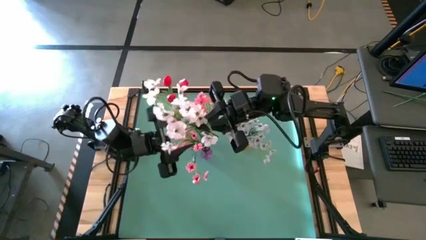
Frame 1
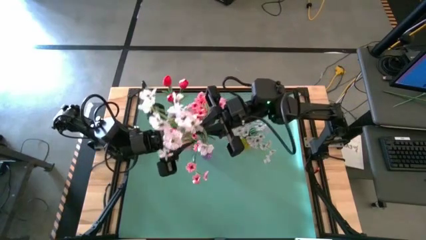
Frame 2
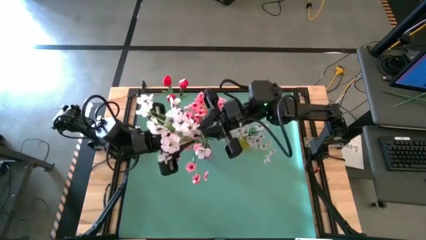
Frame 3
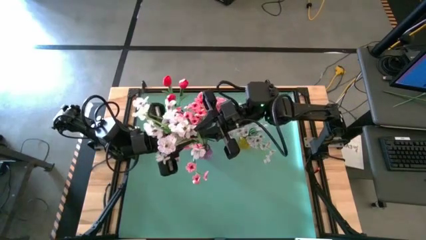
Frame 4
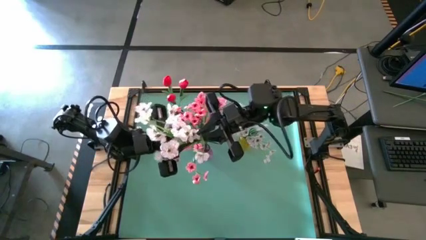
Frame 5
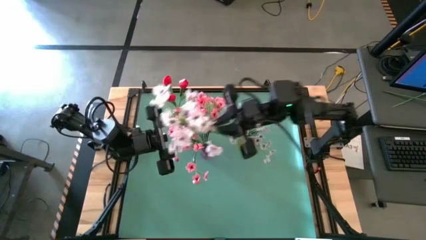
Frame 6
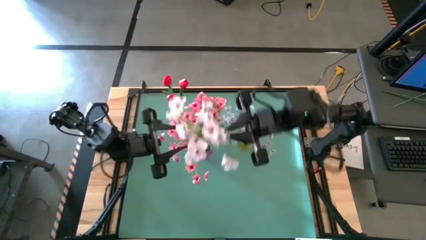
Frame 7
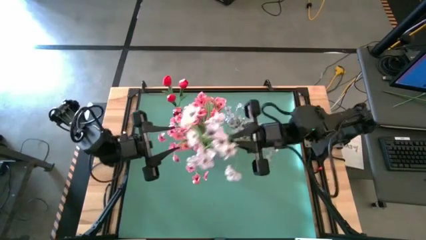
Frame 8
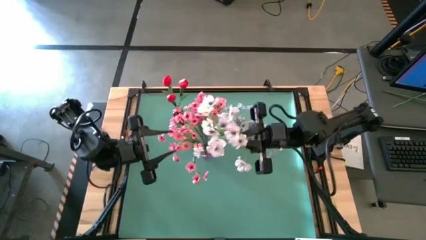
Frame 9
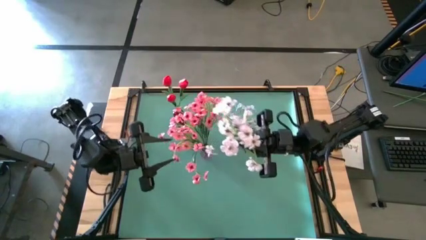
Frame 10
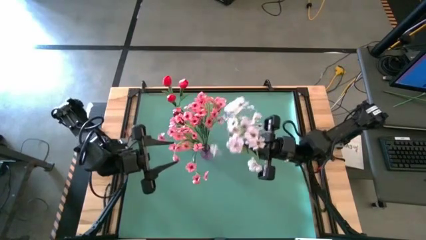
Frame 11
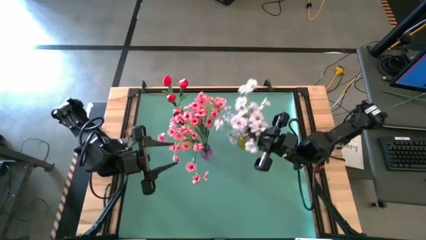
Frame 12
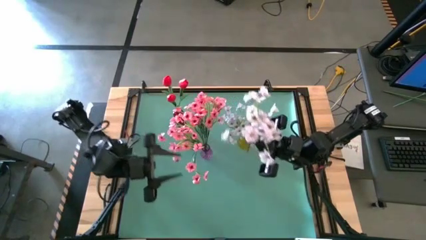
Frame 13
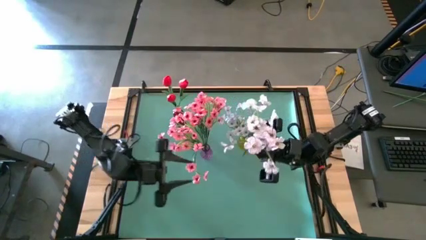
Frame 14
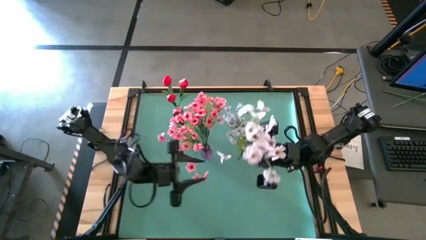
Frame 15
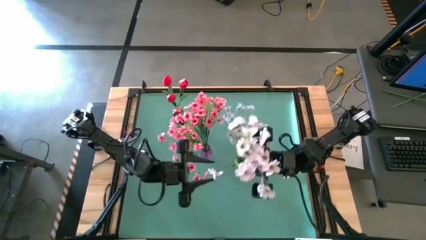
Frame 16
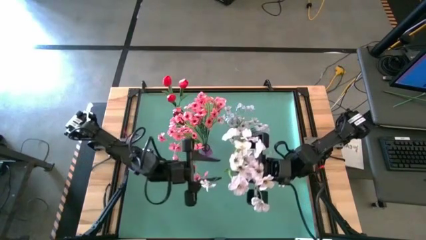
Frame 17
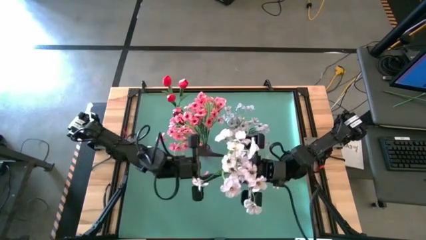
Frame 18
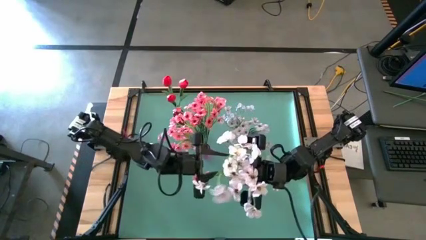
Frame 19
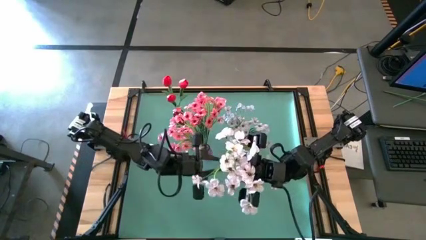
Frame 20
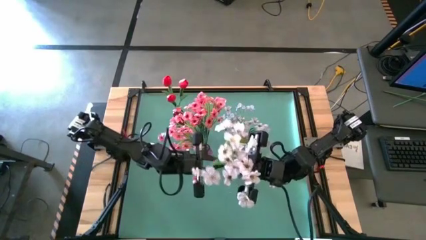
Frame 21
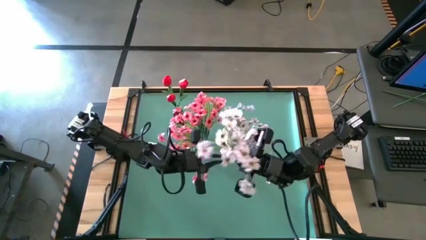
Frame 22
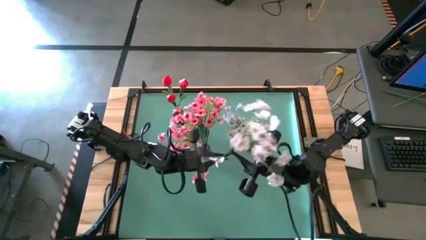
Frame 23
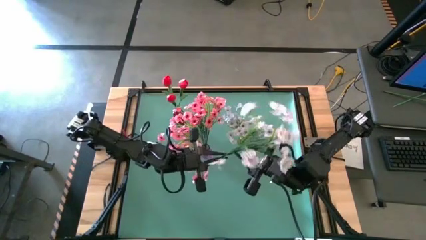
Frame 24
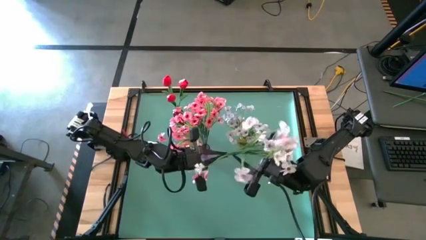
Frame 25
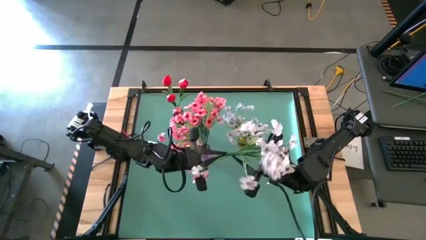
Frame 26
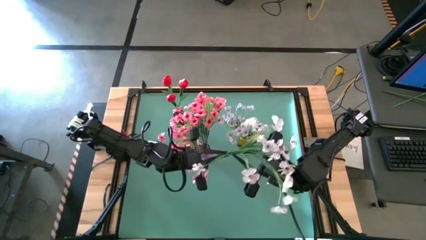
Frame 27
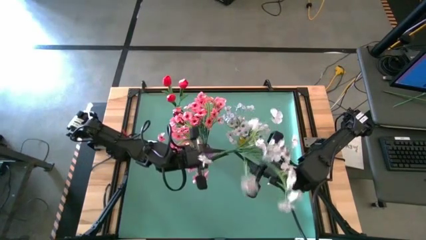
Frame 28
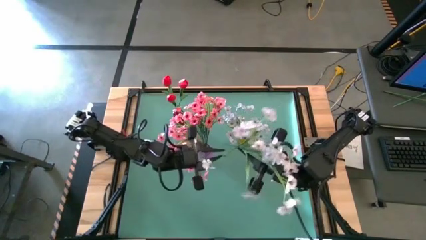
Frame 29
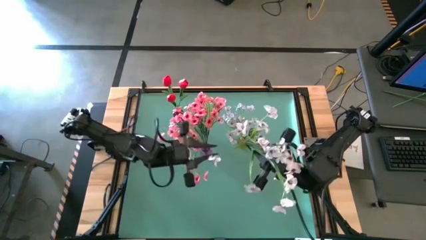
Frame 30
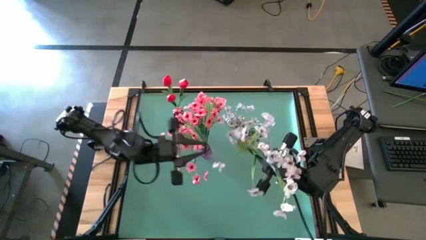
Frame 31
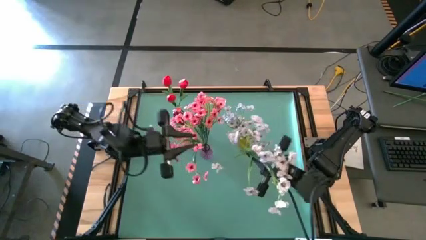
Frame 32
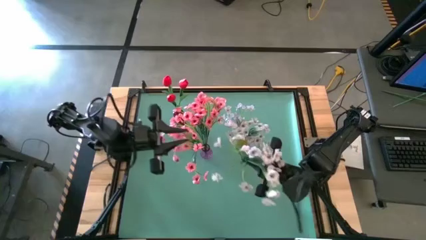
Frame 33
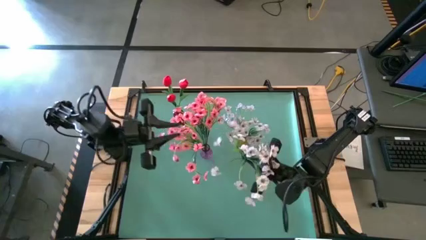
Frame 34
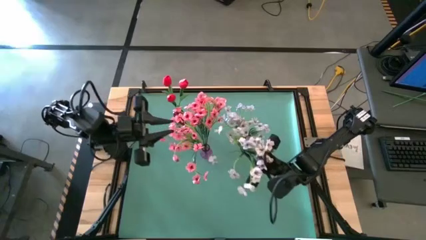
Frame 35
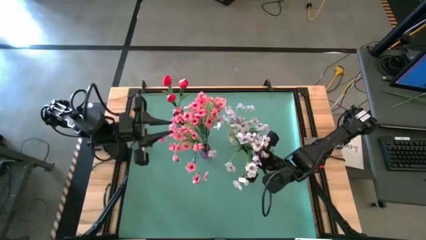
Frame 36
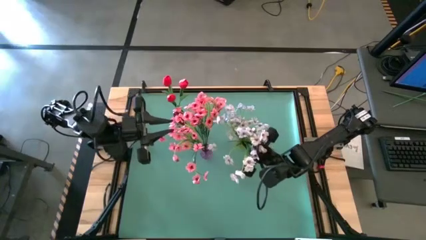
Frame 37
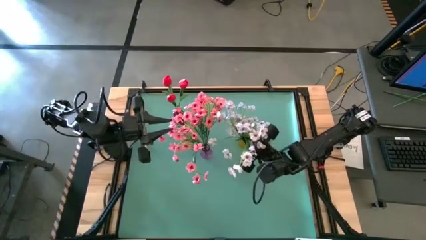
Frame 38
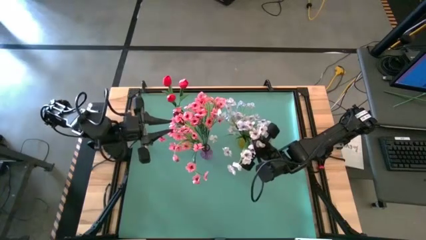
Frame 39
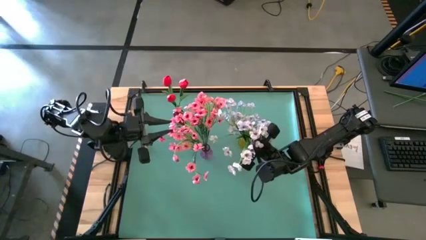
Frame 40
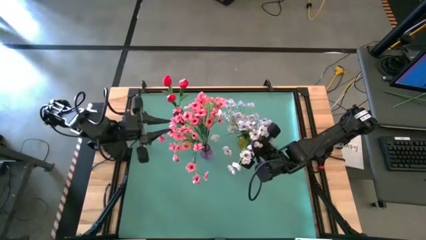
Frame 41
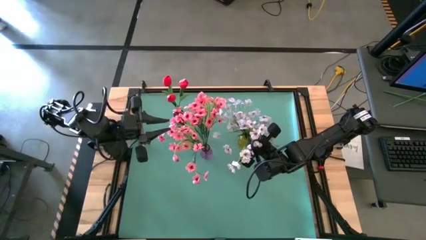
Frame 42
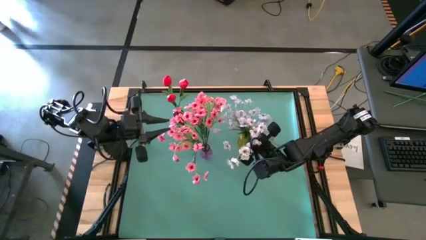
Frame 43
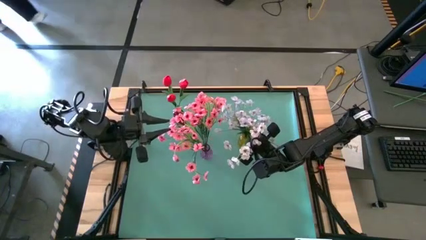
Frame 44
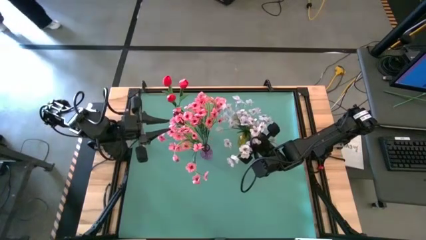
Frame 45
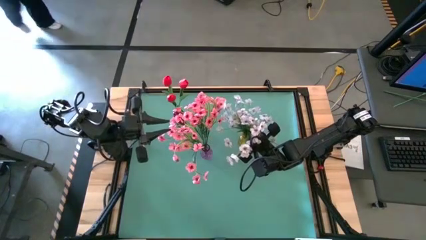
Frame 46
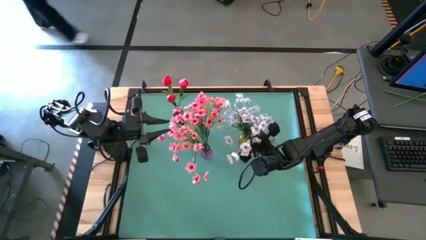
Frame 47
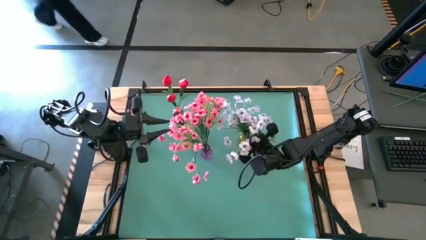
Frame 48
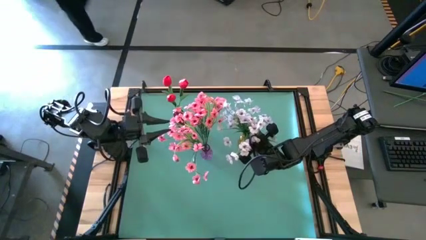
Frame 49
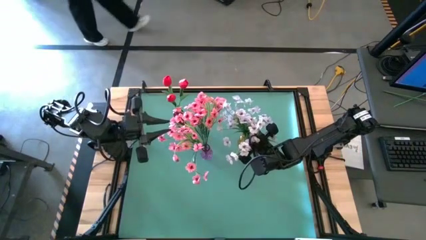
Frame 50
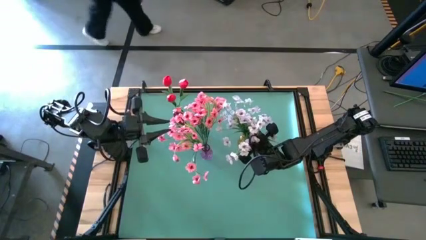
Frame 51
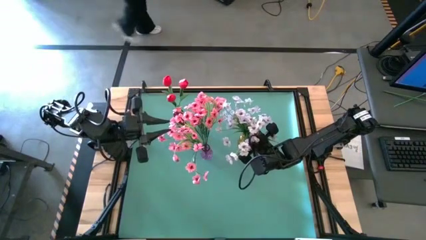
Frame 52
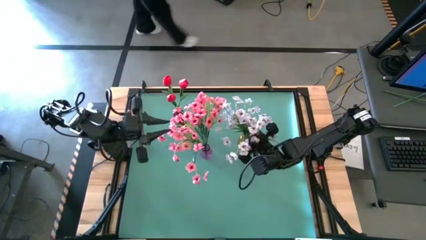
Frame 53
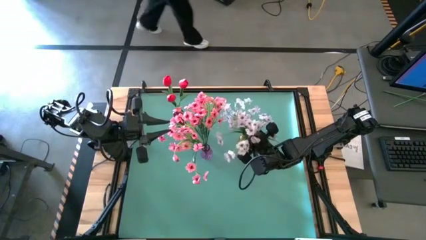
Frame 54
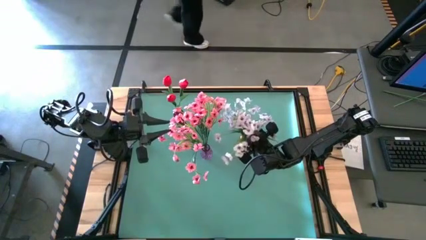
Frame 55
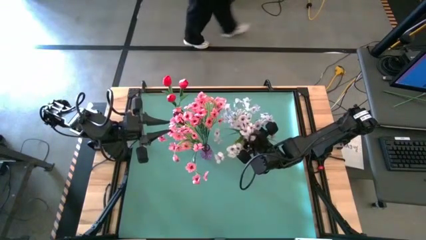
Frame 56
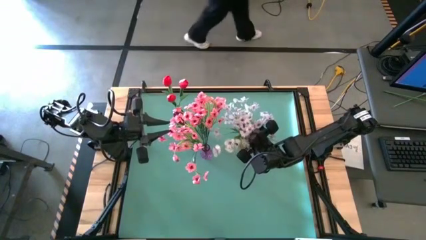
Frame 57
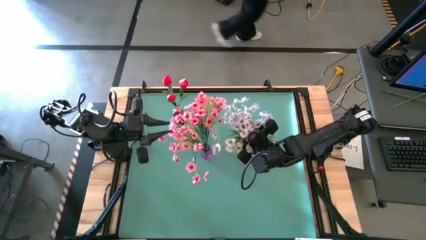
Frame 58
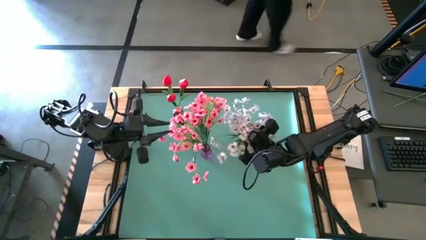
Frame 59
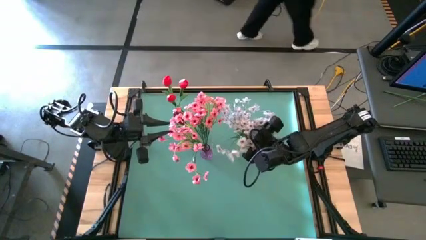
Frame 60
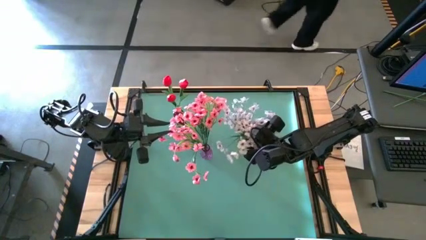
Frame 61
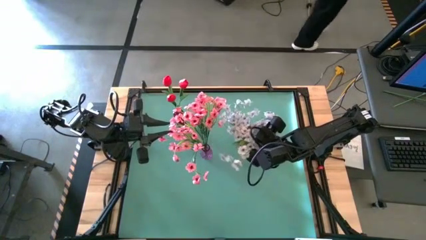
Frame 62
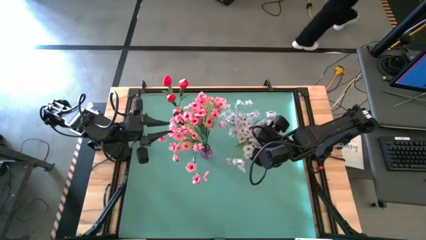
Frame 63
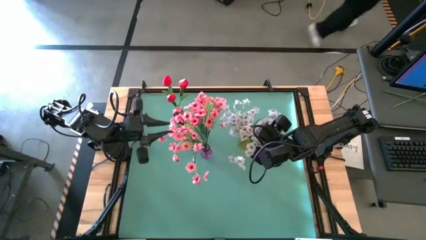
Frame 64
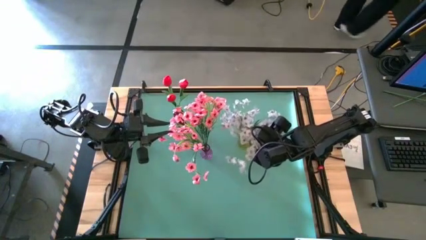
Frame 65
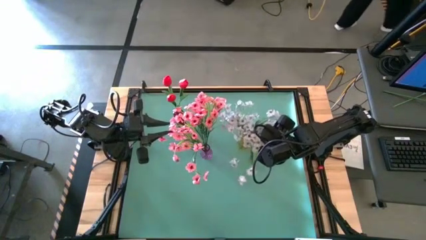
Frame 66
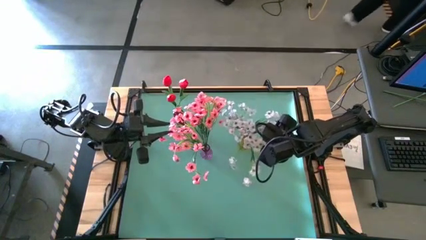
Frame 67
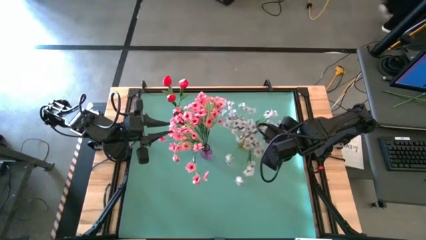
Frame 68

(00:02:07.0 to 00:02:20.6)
Task: Sort flowers into vase by color
Put the white flower into the yellow vase
